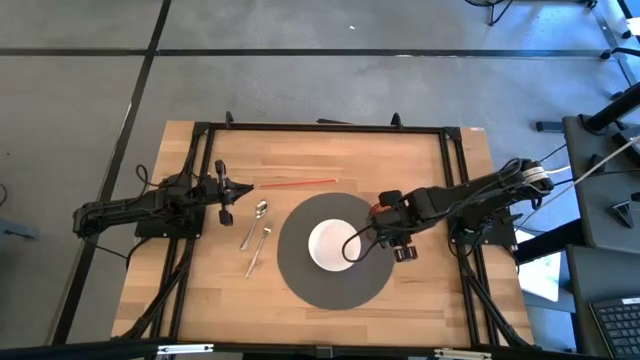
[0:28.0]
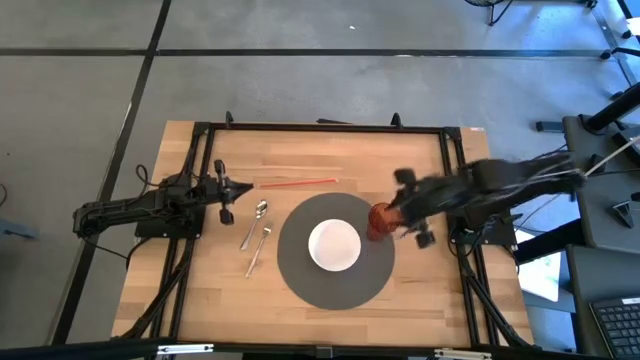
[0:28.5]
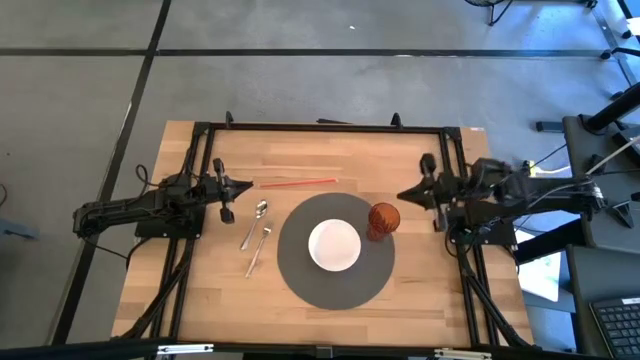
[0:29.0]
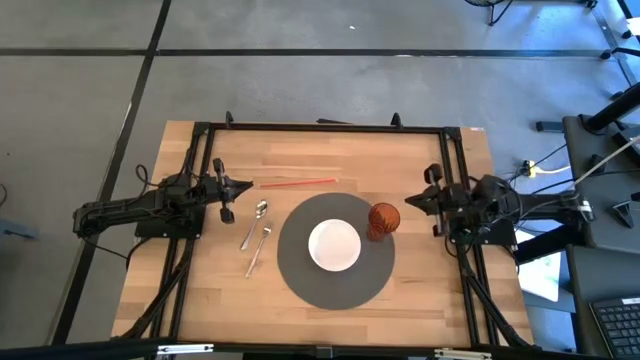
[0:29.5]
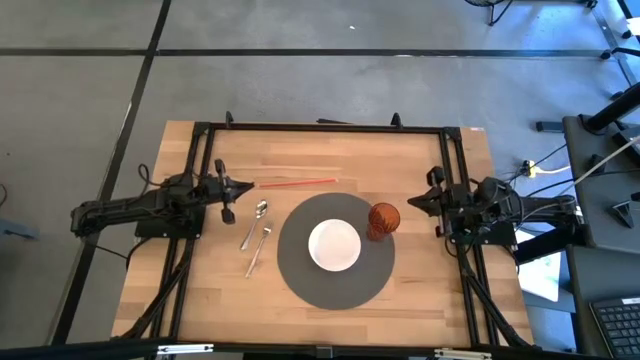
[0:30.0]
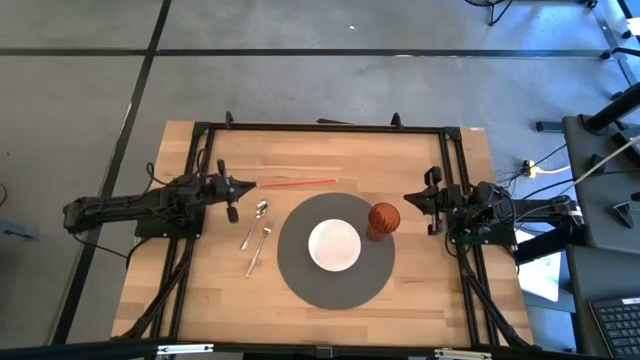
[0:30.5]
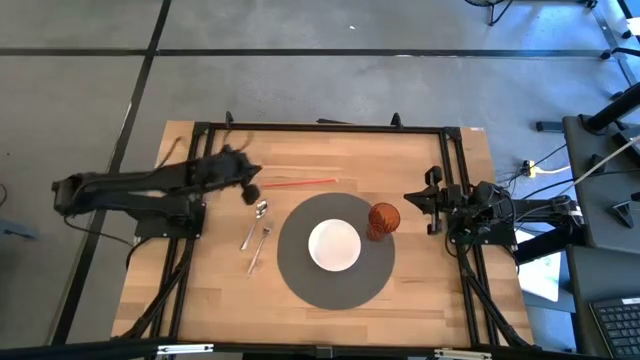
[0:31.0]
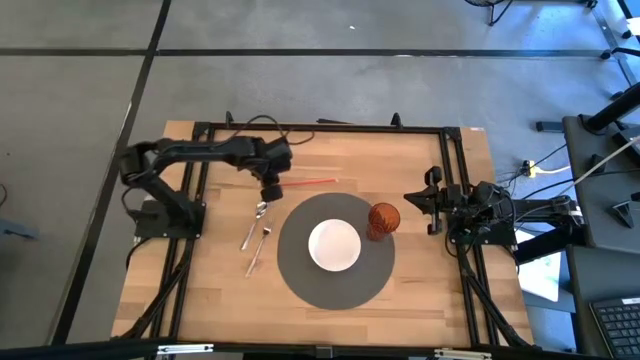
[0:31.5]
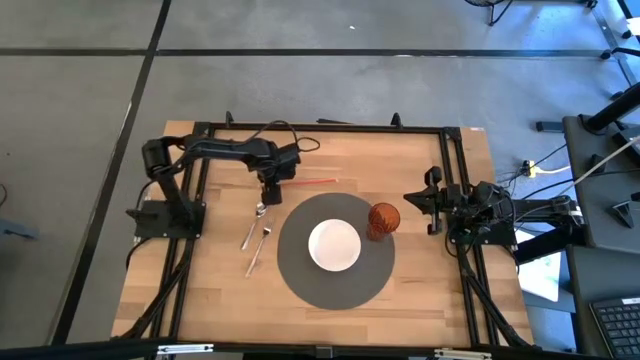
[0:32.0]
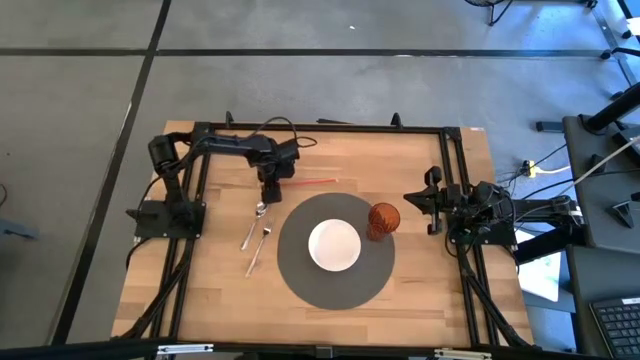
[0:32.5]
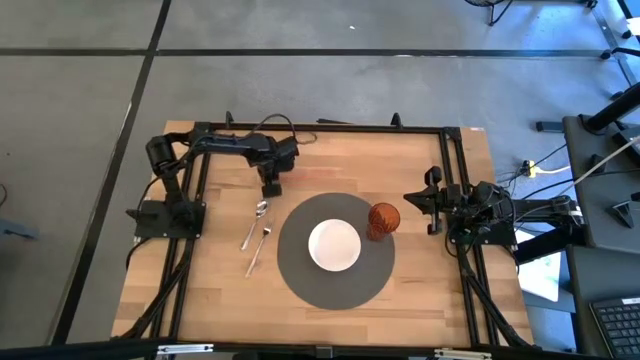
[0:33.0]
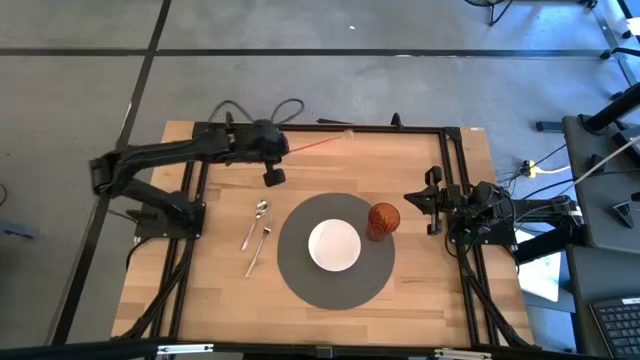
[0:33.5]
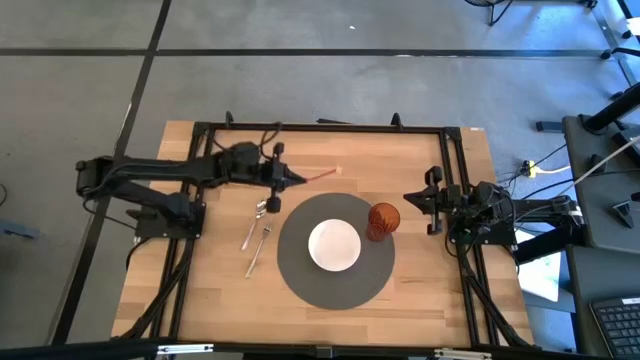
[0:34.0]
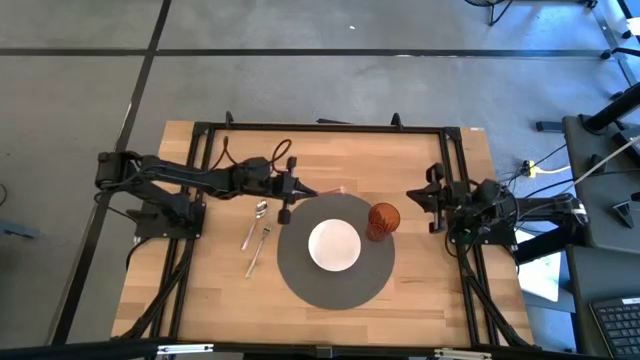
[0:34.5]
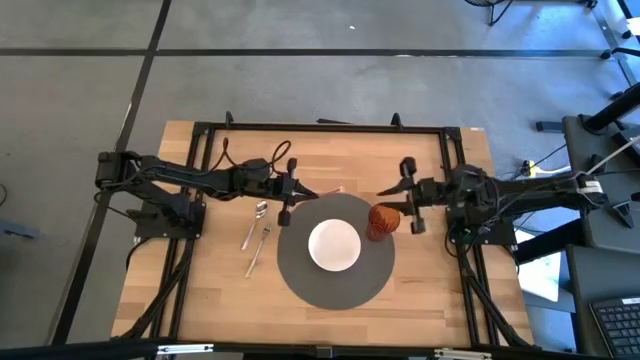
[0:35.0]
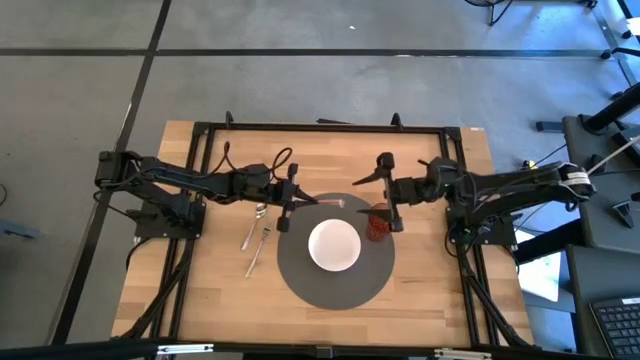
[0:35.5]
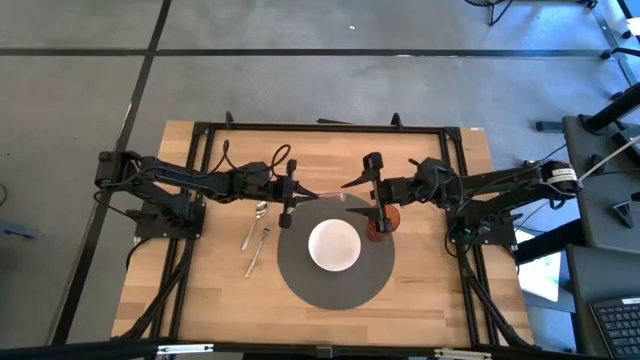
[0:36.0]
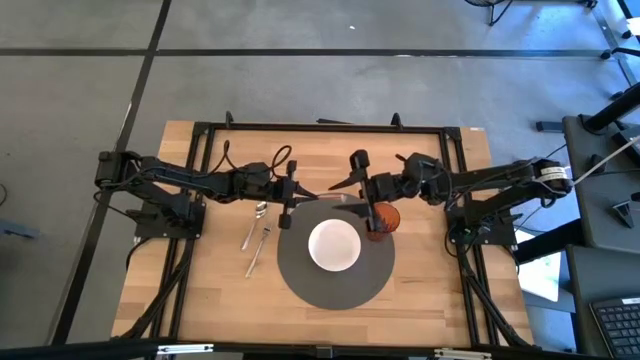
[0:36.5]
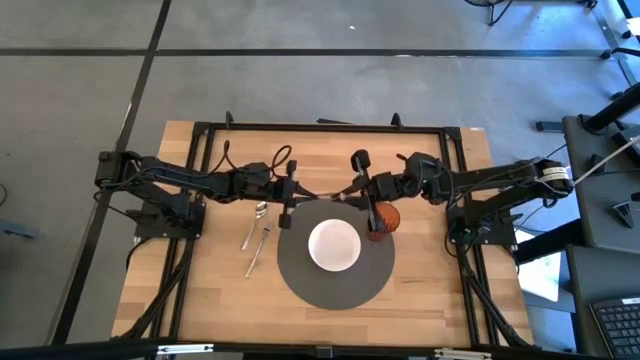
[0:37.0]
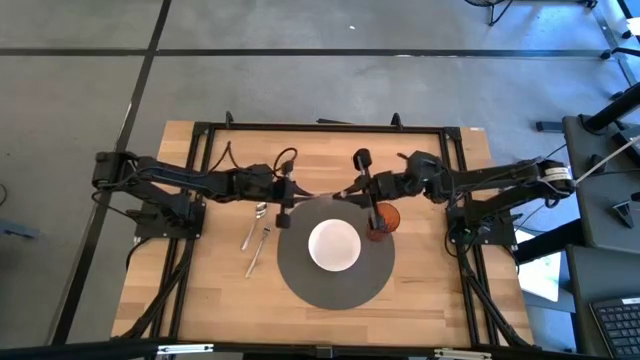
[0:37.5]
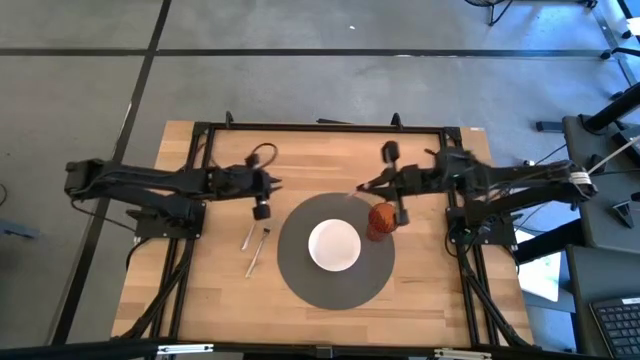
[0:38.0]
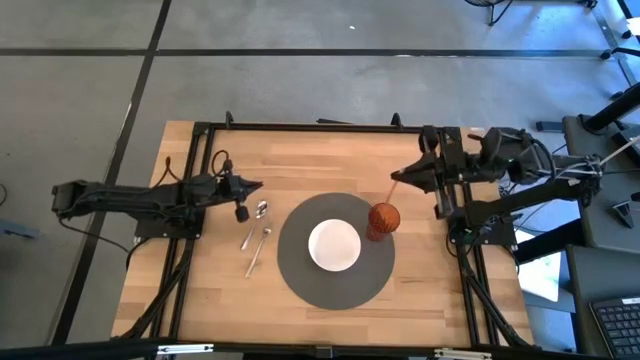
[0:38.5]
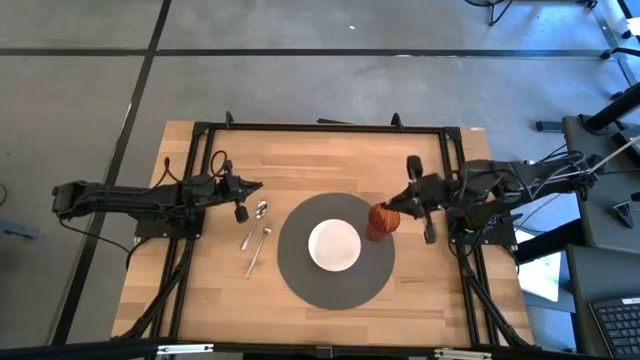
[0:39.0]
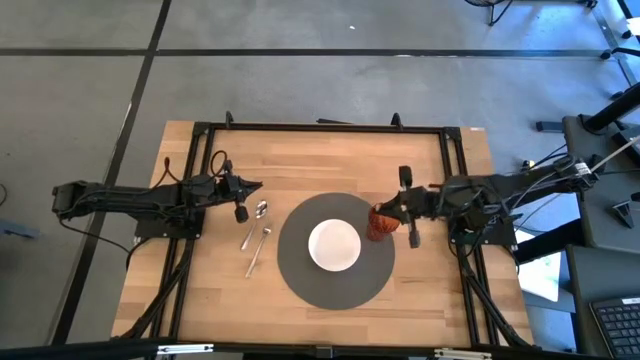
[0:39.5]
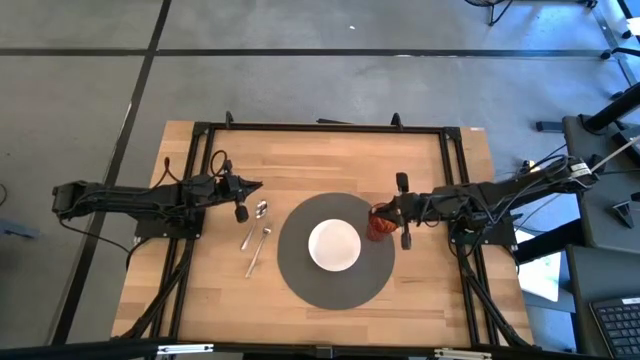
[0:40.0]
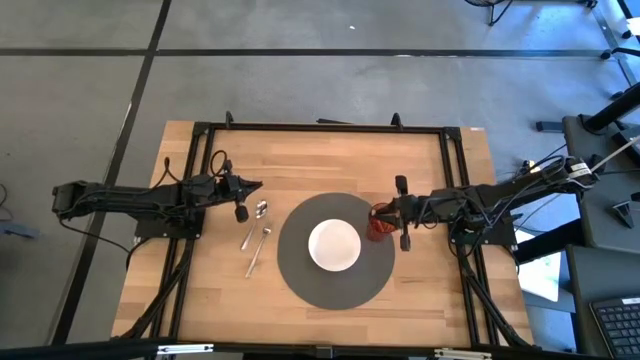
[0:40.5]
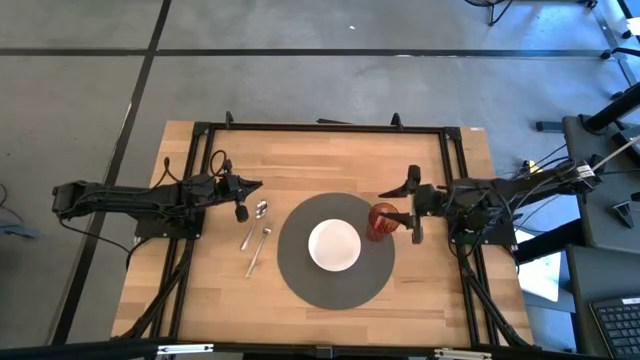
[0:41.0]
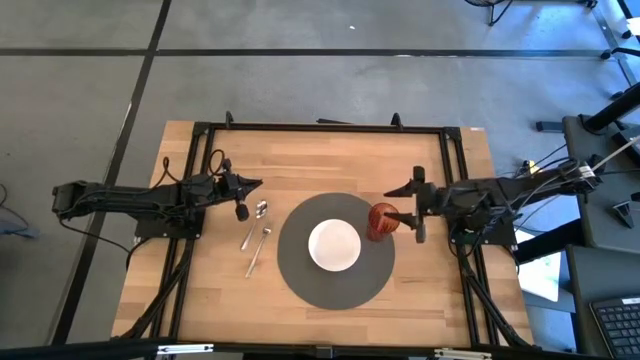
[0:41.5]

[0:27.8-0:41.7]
Task: Pick & Place Utensil
Put the red drinking straw into the red cup

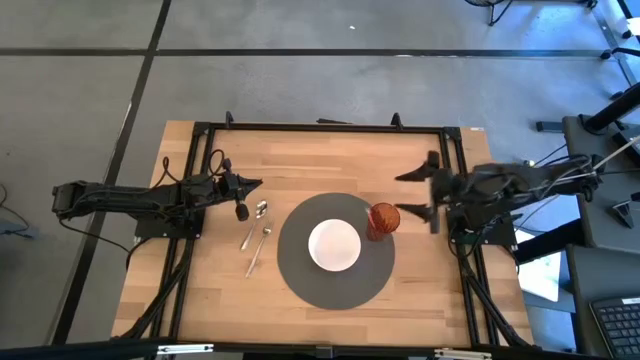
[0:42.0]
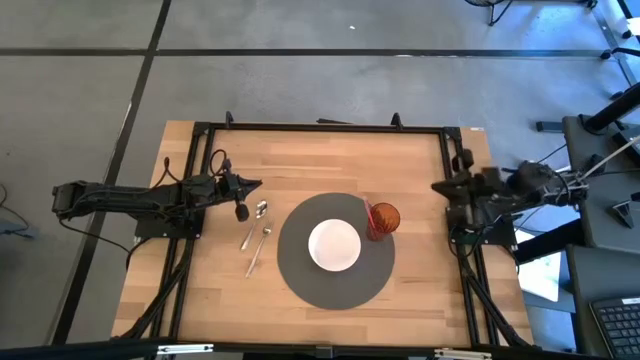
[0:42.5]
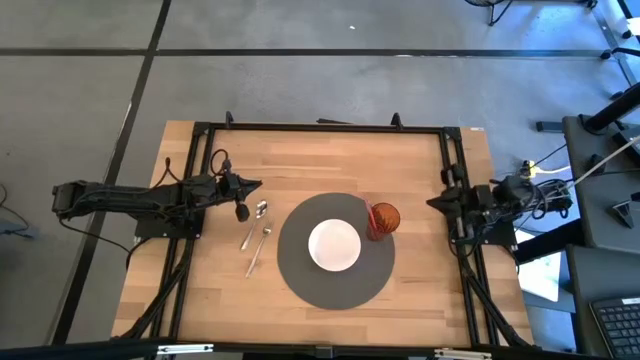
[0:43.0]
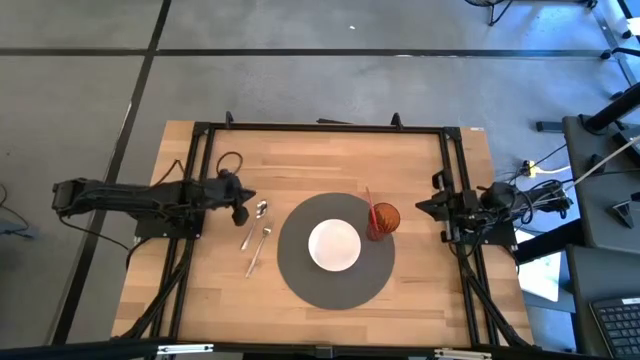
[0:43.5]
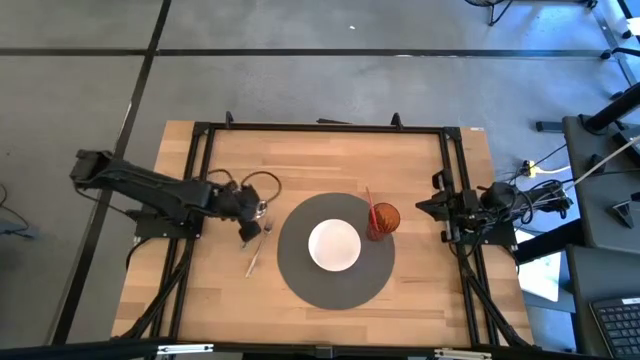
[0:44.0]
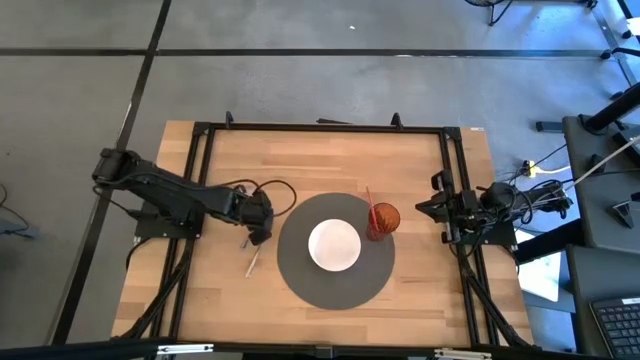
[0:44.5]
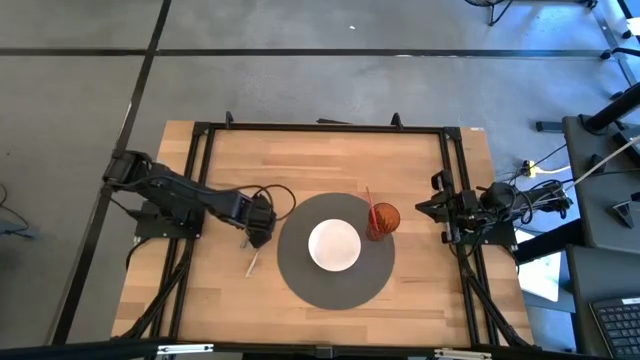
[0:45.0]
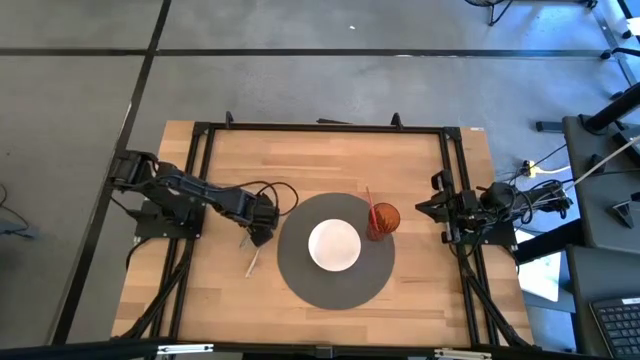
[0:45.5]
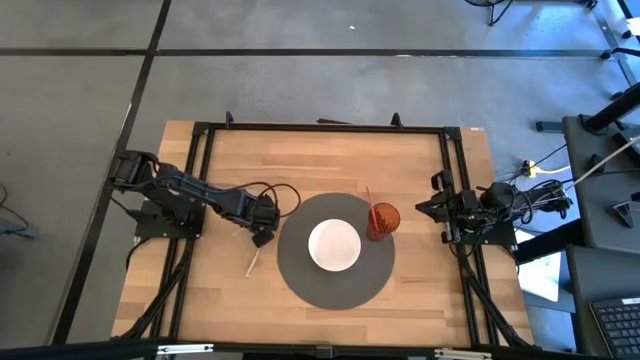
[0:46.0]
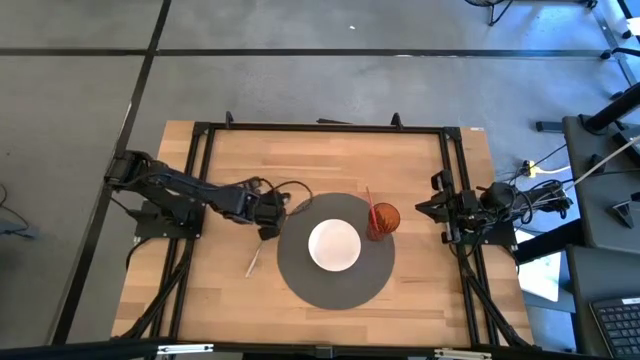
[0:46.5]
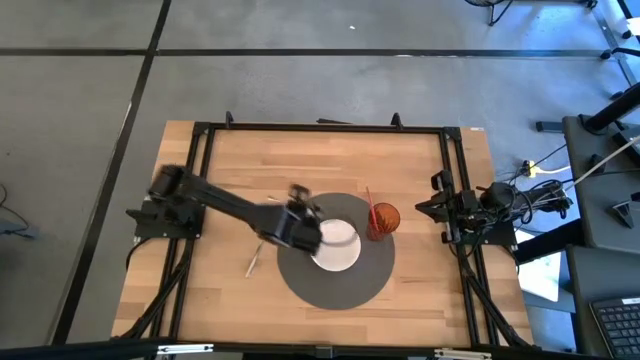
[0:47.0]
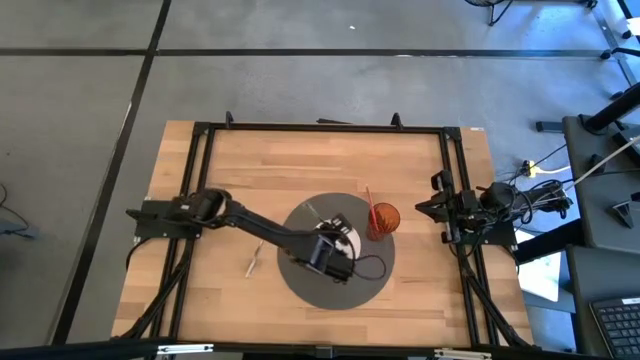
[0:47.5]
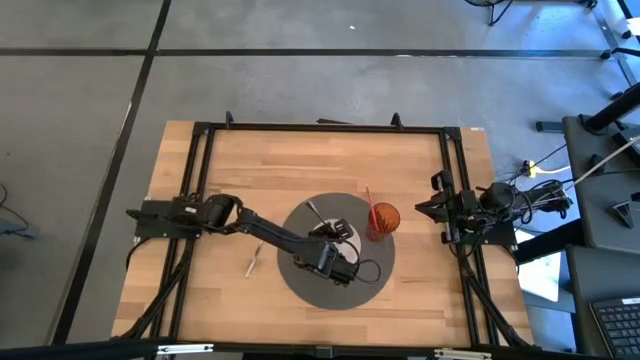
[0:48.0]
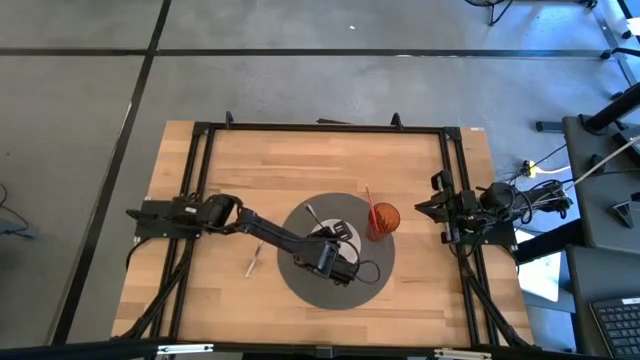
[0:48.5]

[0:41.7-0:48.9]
Put the silver spoon into the white bowl

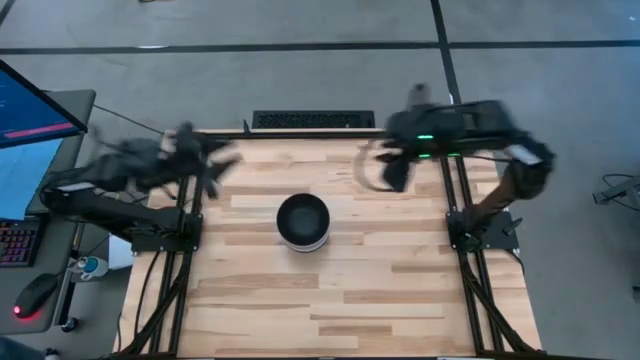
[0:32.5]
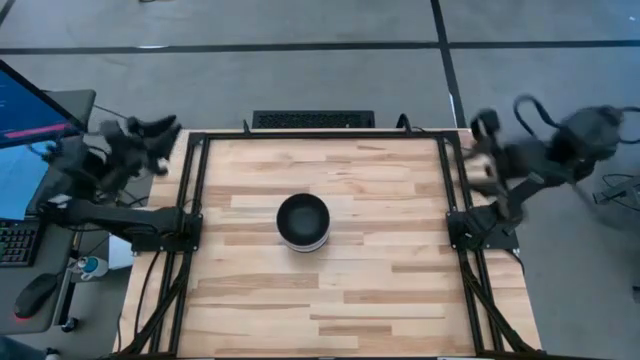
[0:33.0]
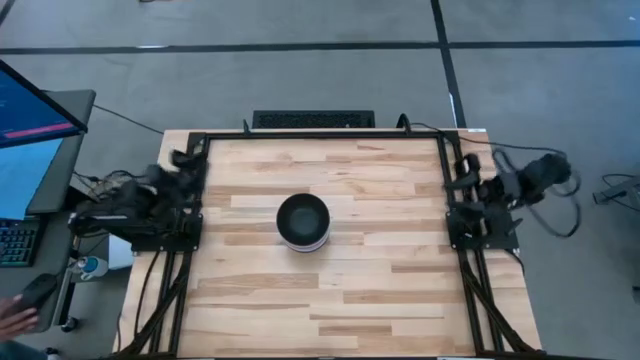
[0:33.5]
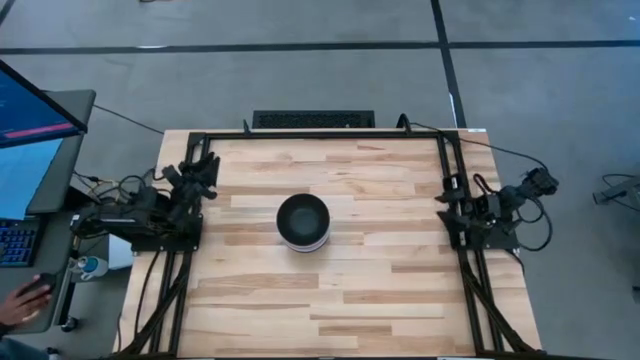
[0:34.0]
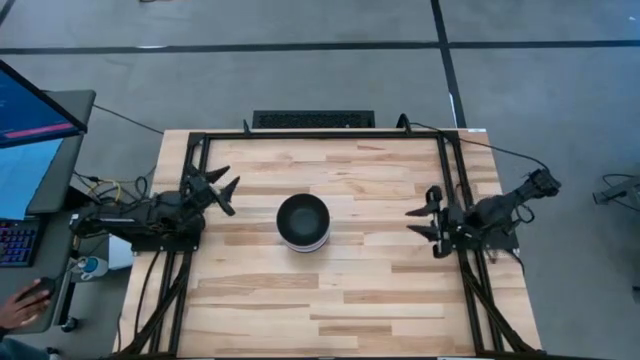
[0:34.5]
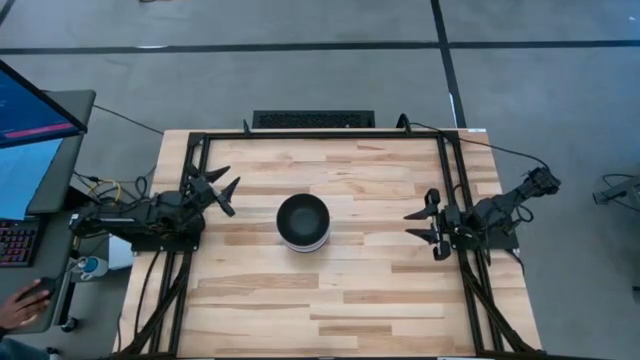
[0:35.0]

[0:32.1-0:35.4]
Task: Nest bowls inside each other
Return to Home Position
